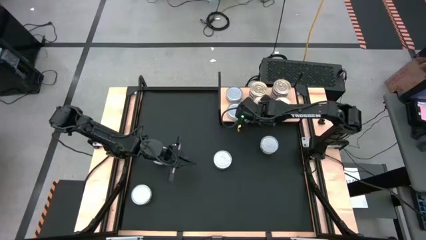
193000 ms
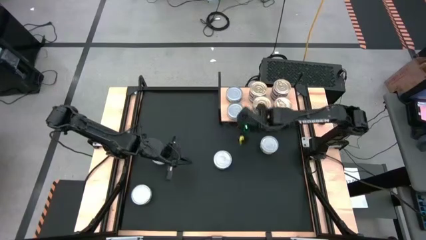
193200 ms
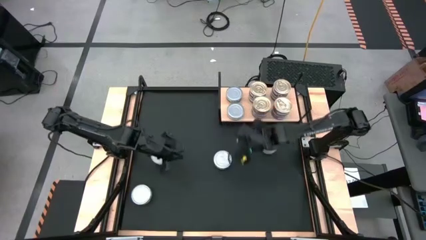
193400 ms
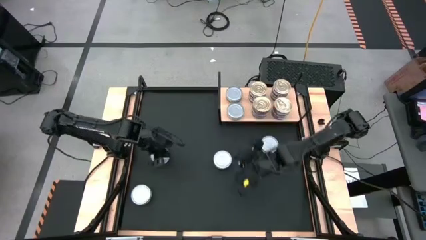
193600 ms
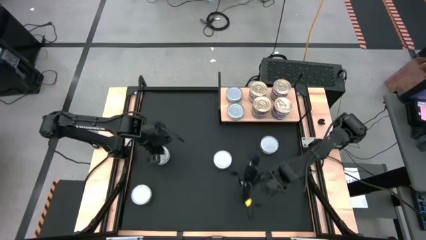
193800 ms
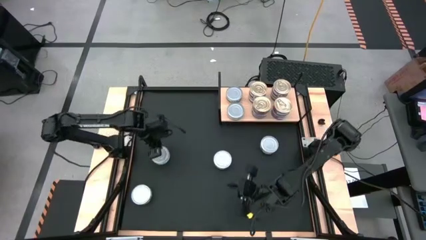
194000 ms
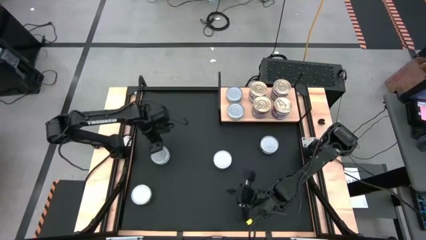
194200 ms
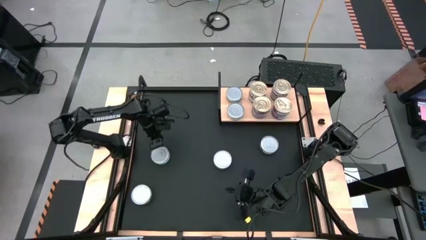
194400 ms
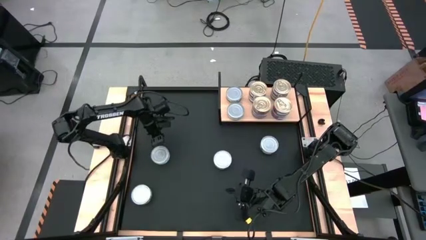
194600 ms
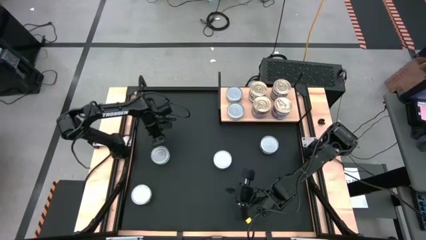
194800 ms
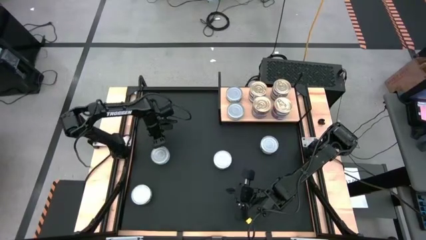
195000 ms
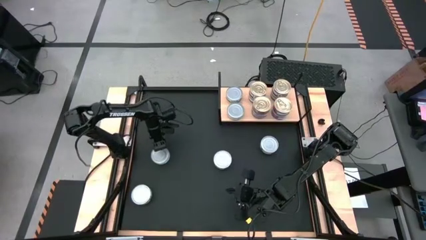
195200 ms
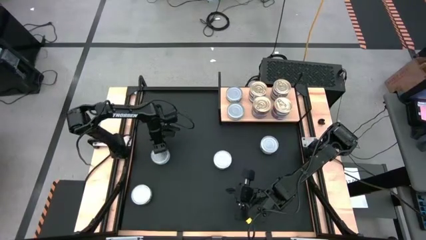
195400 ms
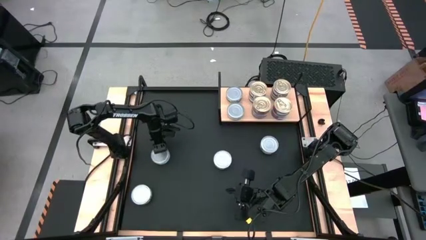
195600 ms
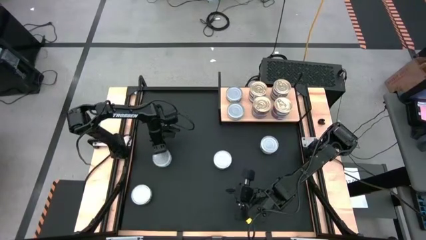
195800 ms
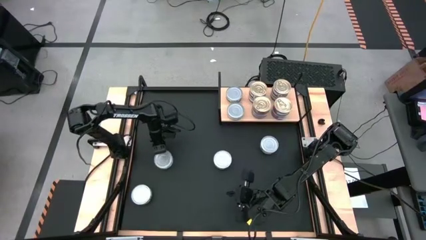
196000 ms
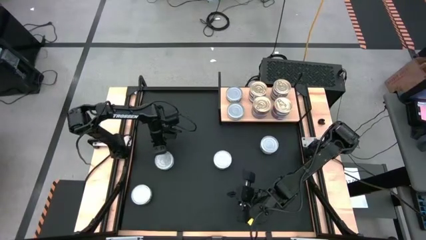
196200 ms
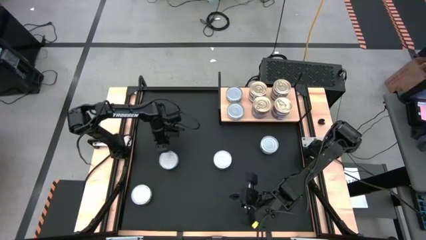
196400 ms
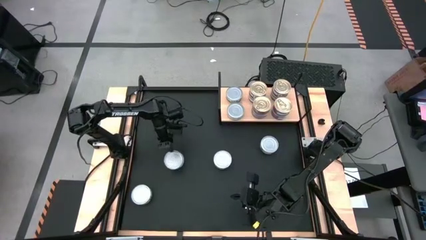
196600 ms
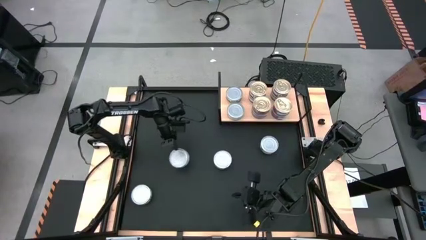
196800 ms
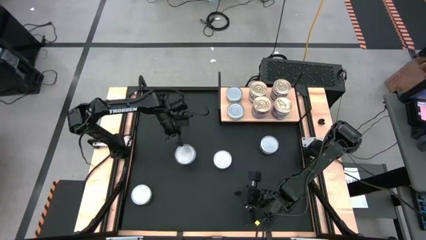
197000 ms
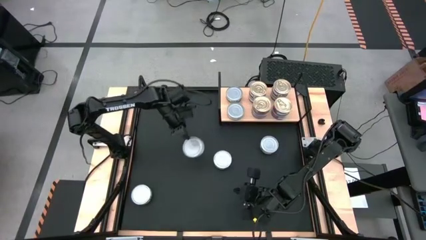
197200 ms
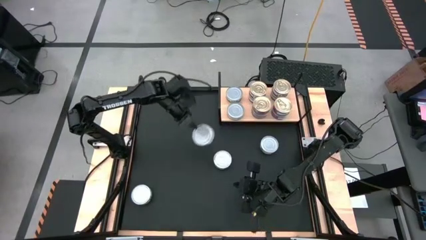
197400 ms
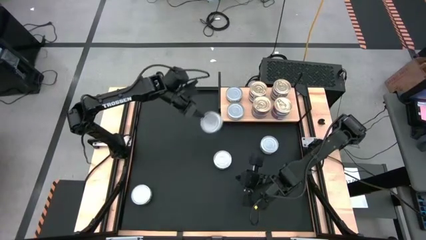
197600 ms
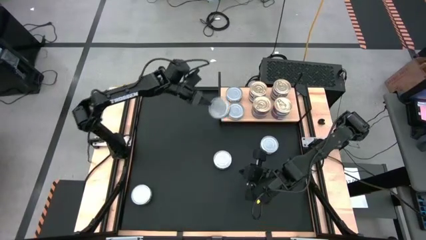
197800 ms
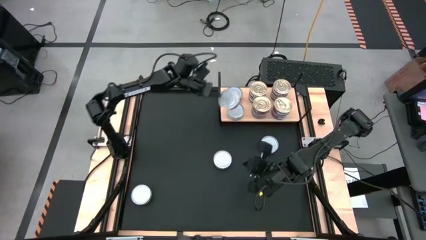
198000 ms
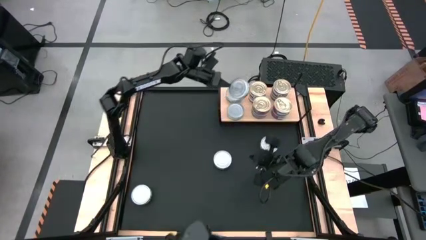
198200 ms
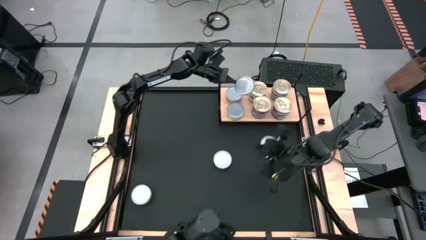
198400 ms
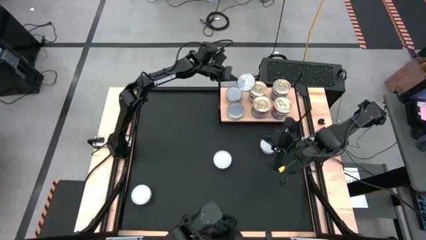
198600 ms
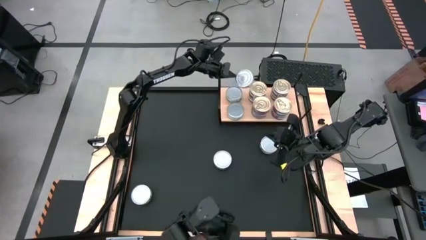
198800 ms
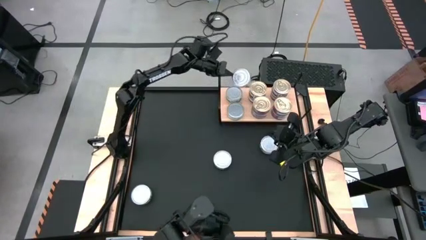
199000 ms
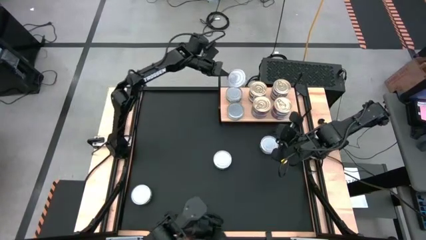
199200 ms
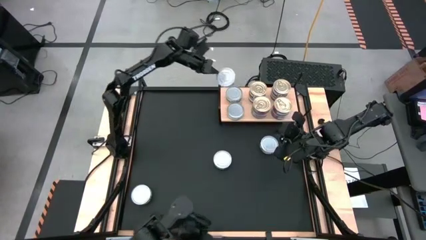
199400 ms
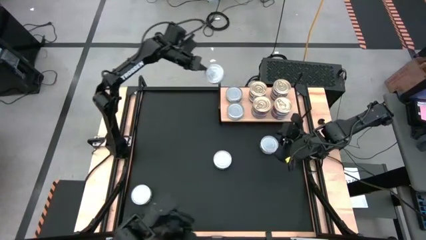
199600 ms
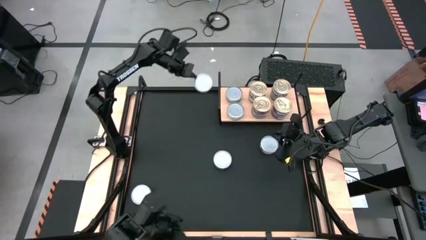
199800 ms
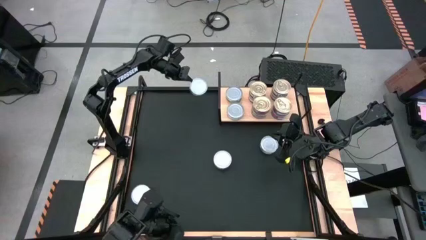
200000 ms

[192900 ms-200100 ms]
Task: Stack canned seafood by type on shelf
Stack the green tuna can on top of the other green tuna can on the shelf

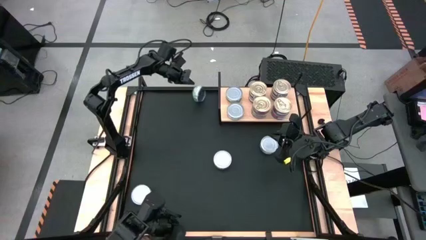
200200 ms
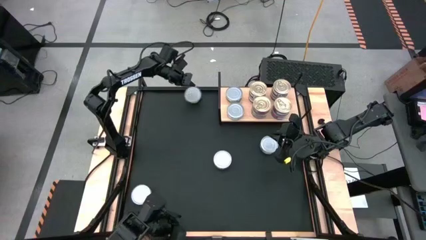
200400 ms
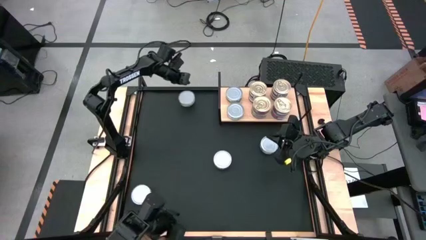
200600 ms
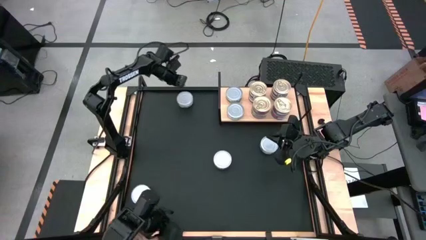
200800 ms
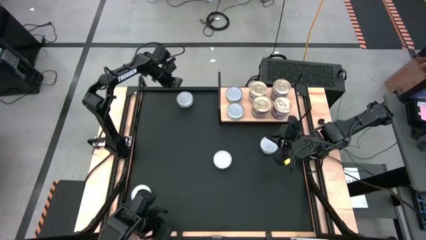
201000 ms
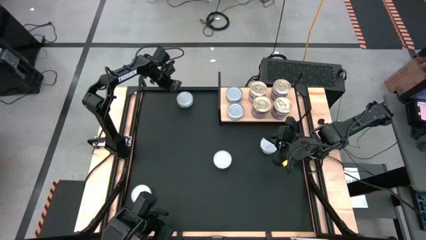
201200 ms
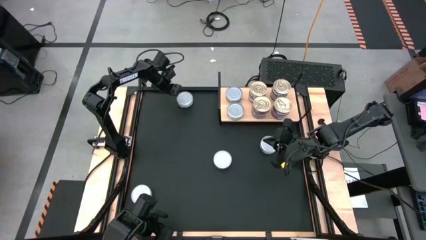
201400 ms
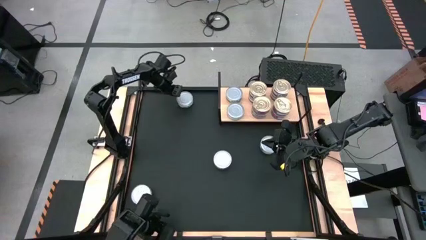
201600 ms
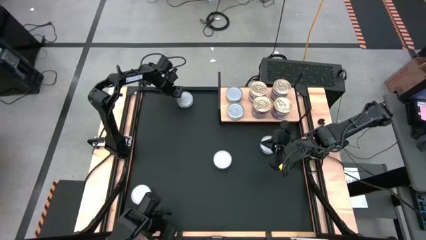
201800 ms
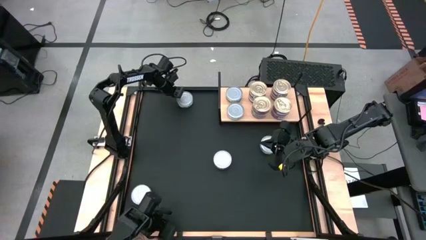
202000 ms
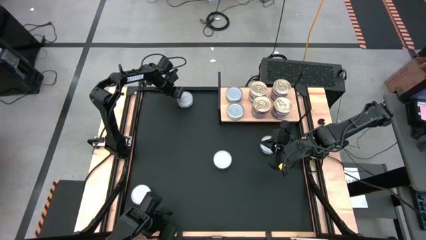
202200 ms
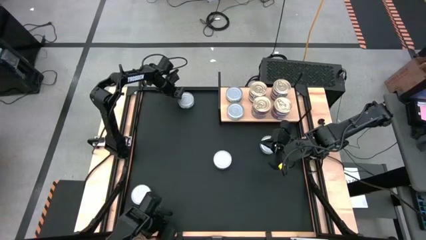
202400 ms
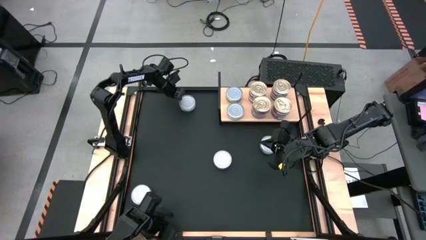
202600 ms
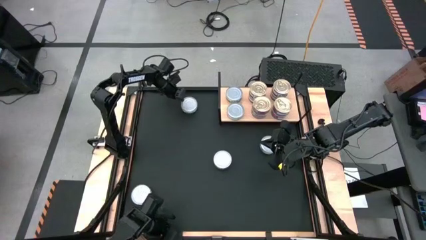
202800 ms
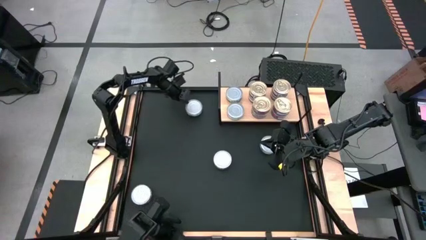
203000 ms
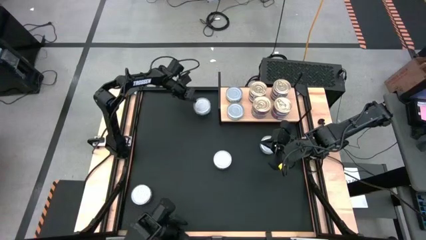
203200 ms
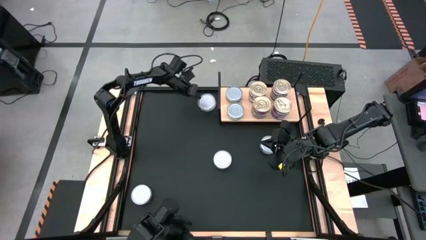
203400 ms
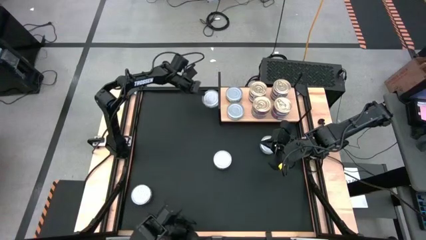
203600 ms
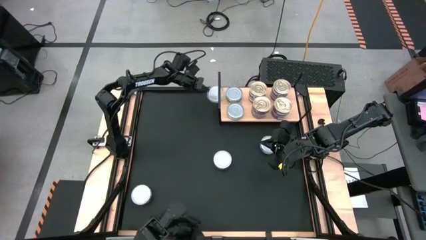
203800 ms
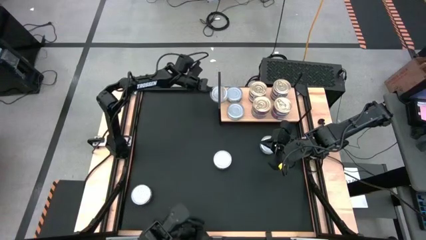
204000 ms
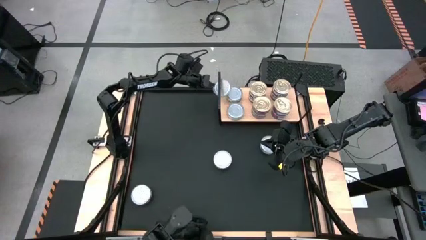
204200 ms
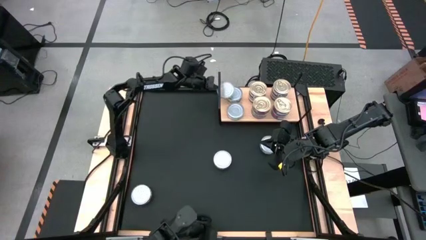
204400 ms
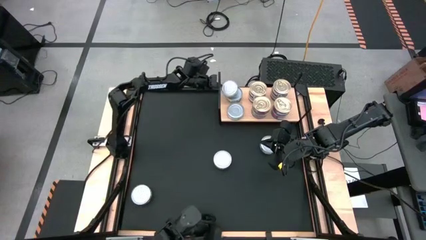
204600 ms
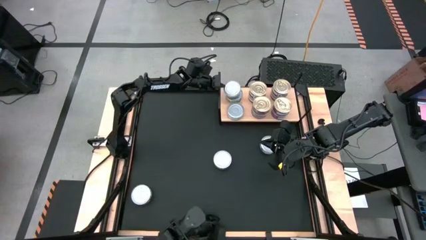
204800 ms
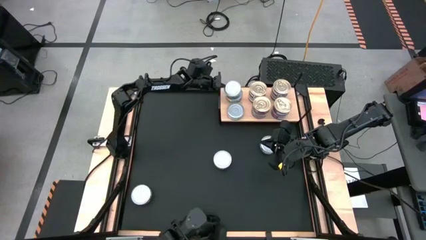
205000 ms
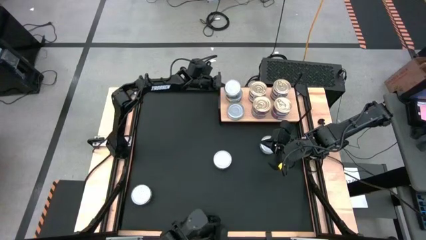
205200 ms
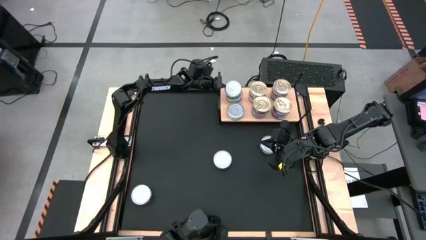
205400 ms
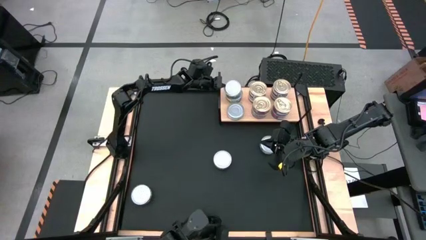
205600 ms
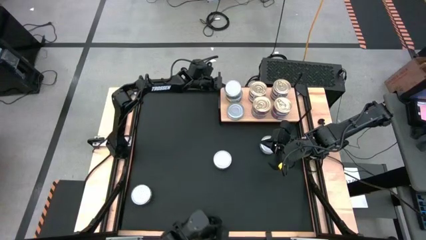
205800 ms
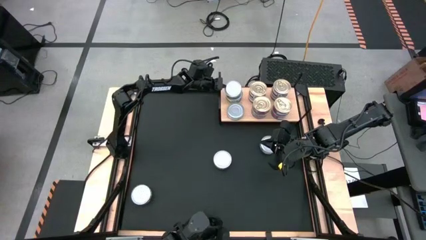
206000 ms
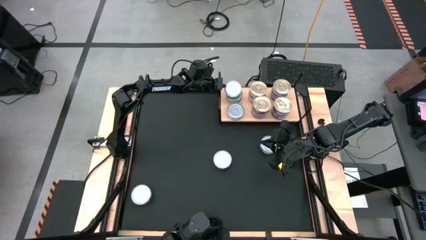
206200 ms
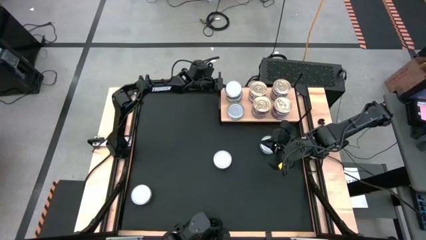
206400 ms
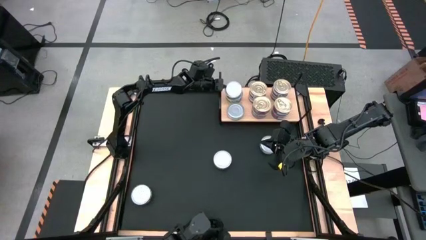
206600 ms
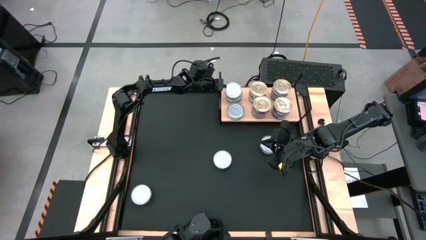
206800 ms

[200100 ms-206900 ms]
Stack the green tuna can on top of the other green tuna can on the shelf

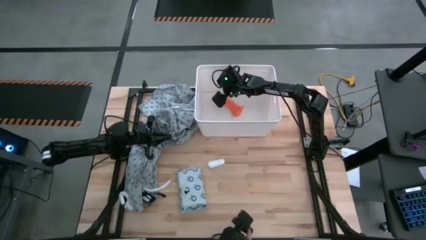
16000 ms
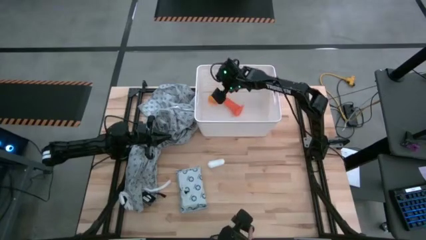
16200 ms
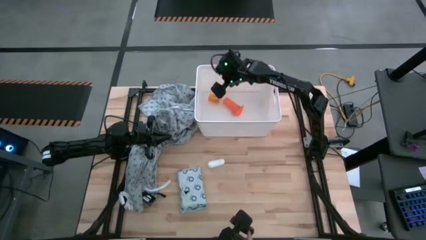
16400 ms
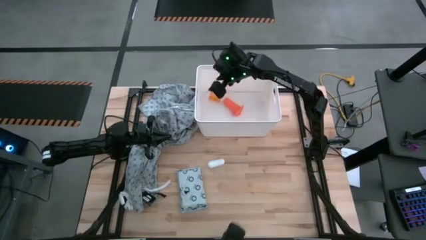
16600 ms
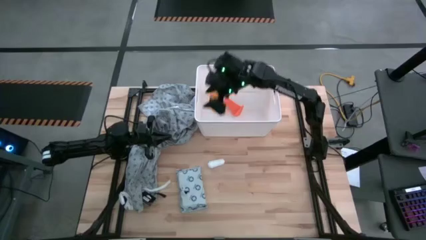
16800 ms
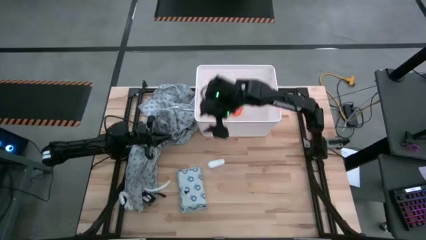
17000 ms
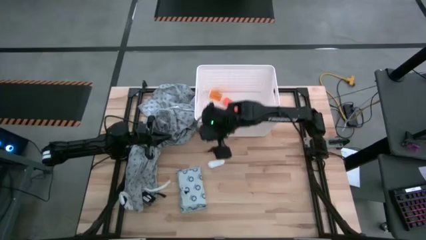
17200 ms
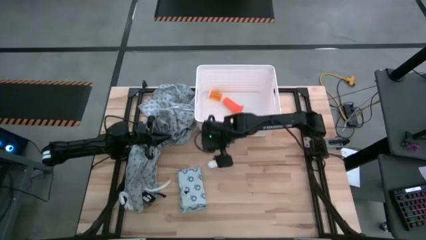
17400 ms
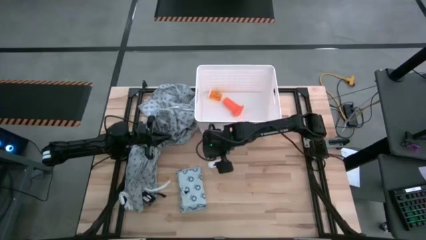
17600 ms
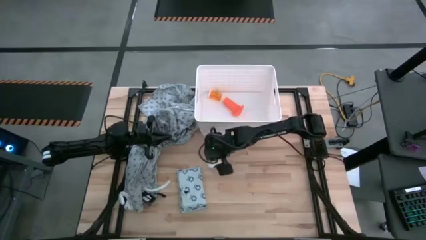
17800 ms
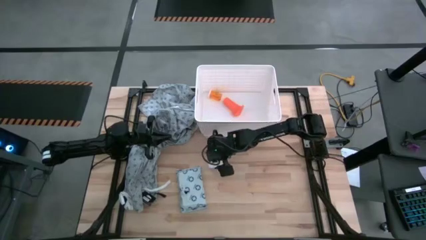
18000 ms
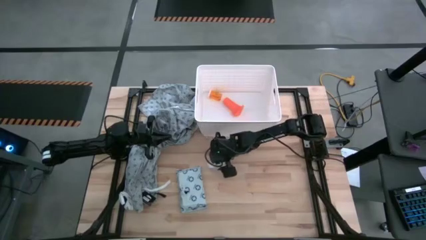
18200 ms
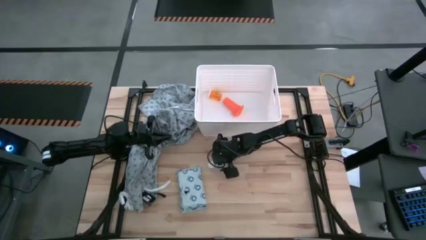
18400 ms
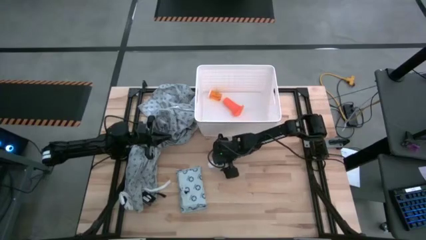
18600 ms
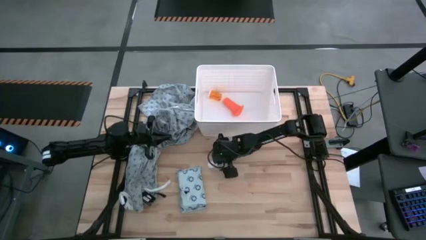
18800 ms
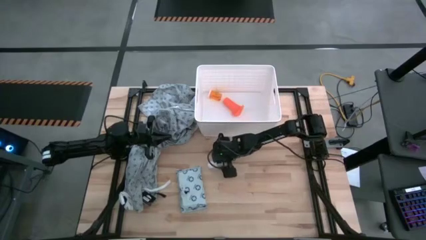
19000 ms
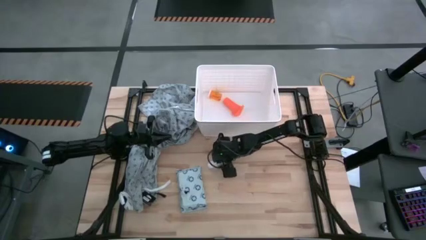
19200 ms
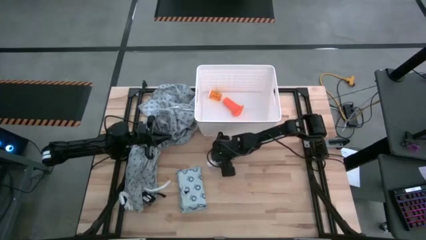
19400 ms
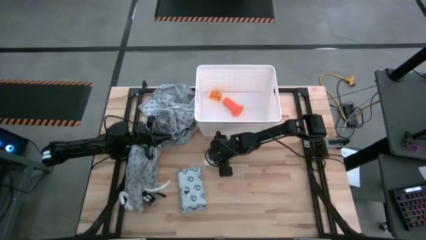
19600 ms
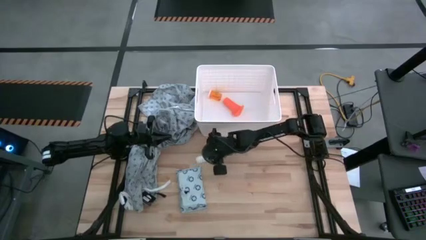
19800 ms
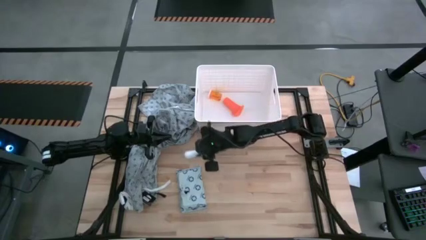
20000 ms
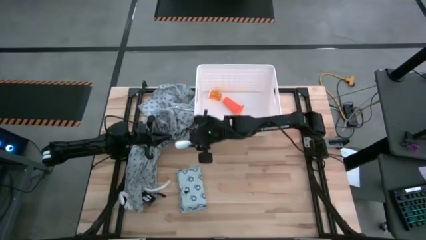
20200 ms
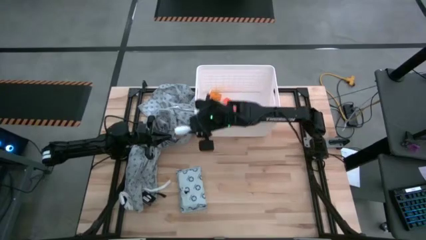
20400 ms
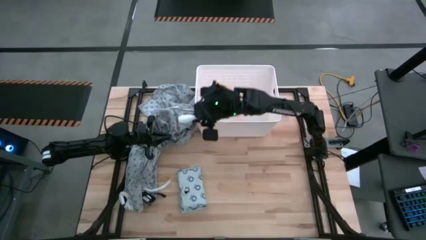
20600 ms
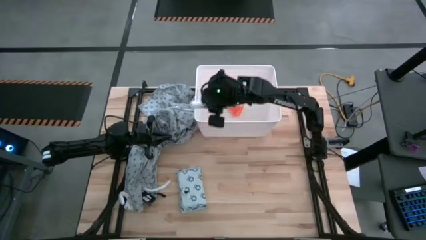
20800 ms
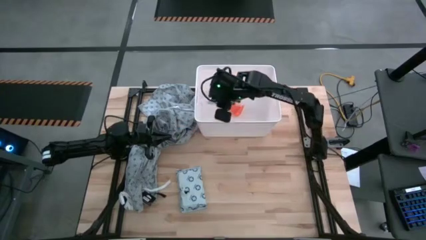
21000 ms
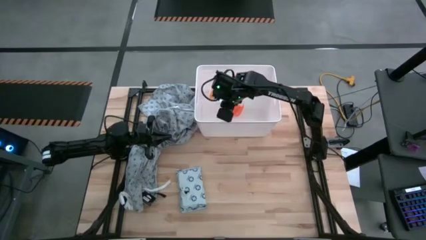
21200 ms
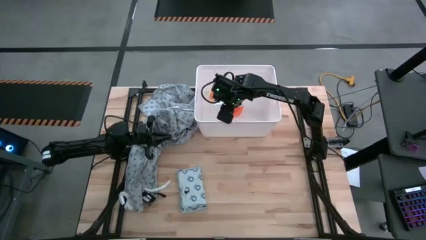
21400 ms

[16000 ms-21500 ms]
Task: Pick & place medical supplies in basket/bin
Put the white bandage into the white bin
